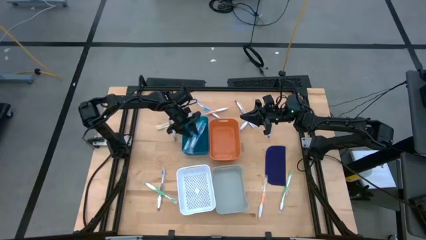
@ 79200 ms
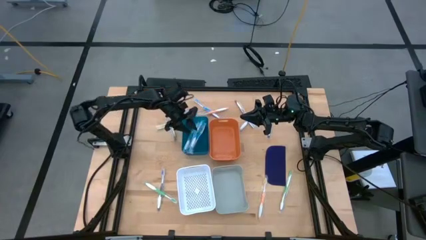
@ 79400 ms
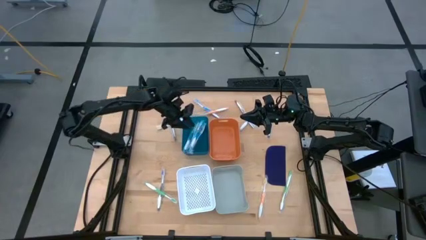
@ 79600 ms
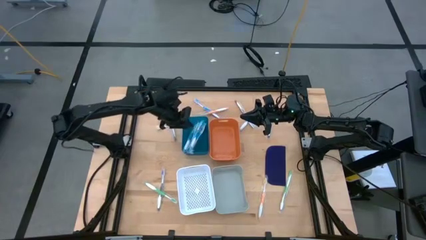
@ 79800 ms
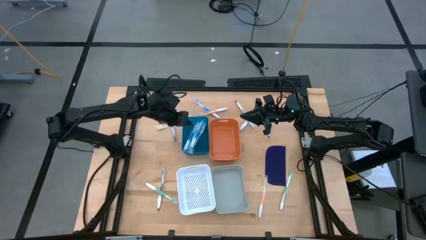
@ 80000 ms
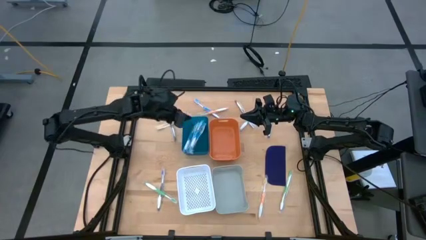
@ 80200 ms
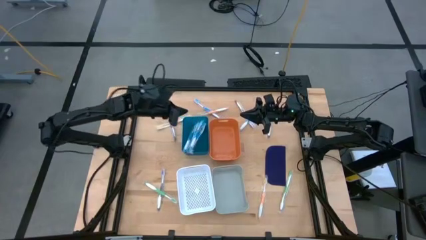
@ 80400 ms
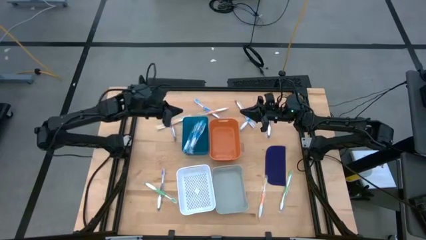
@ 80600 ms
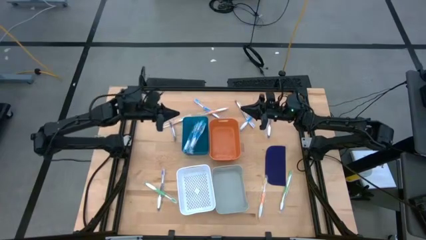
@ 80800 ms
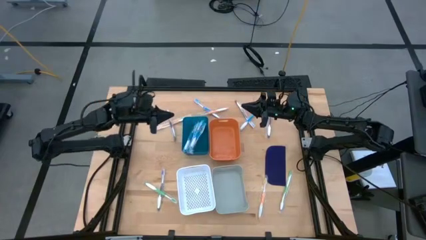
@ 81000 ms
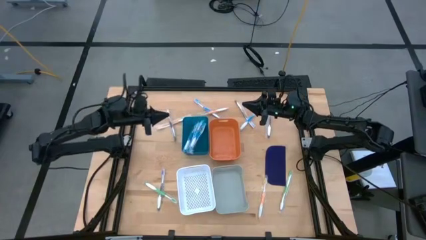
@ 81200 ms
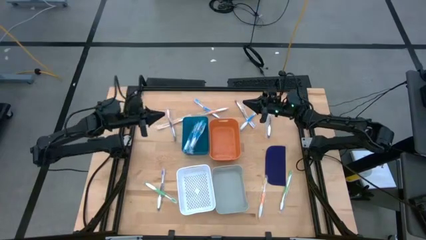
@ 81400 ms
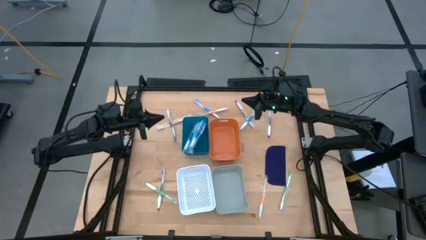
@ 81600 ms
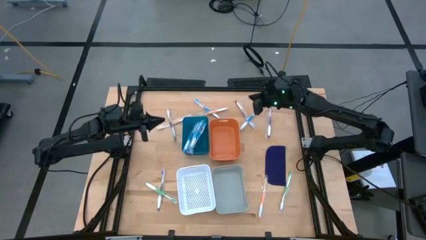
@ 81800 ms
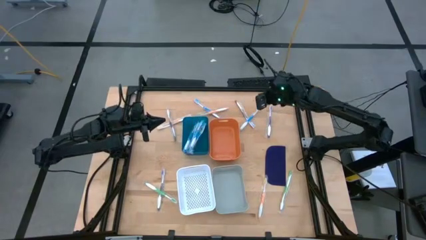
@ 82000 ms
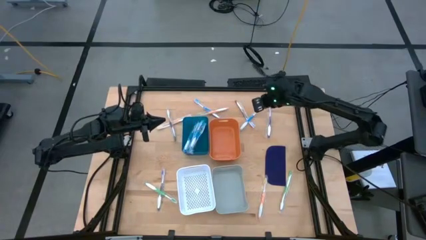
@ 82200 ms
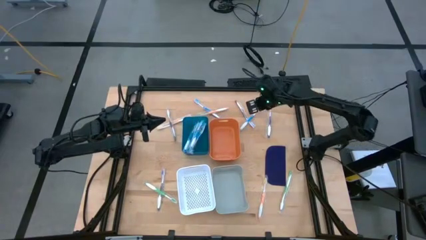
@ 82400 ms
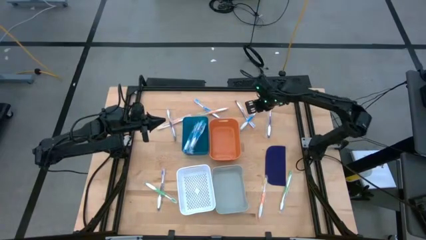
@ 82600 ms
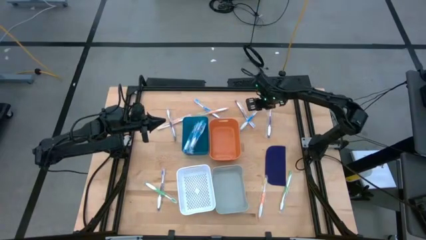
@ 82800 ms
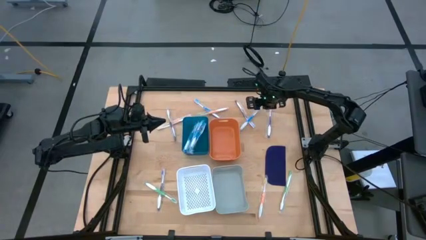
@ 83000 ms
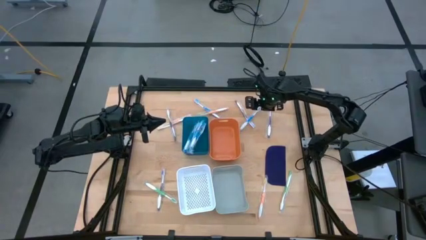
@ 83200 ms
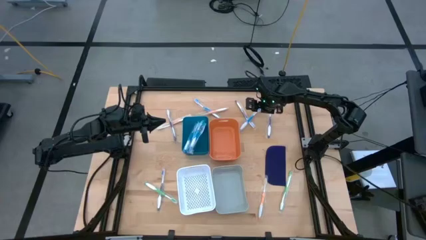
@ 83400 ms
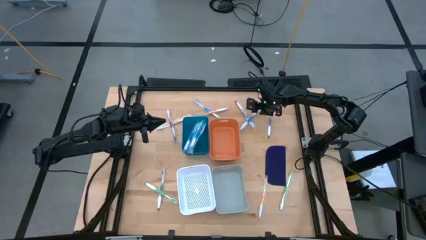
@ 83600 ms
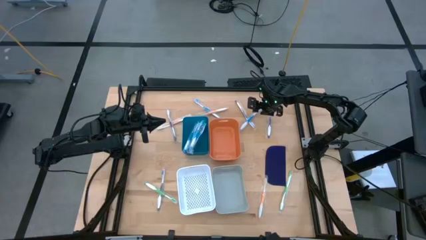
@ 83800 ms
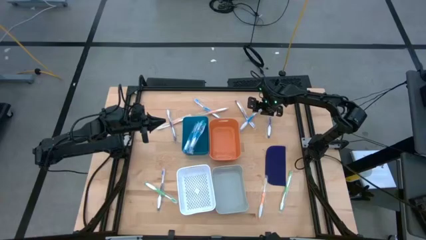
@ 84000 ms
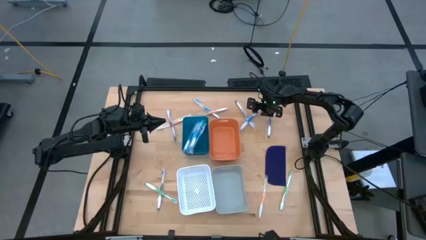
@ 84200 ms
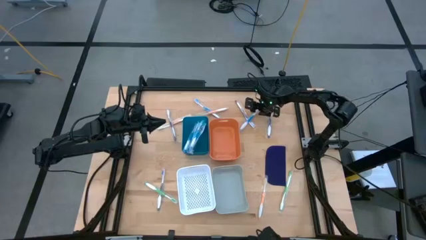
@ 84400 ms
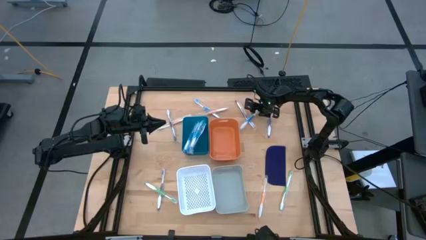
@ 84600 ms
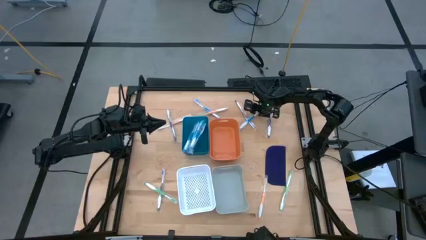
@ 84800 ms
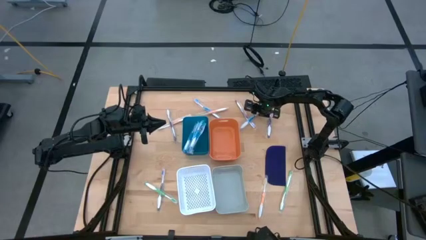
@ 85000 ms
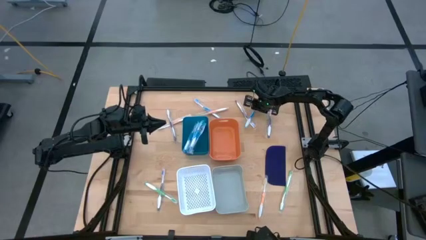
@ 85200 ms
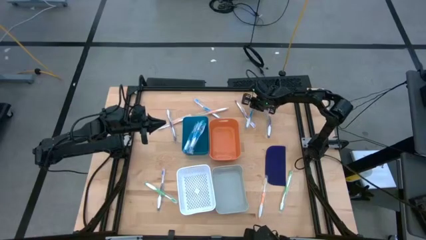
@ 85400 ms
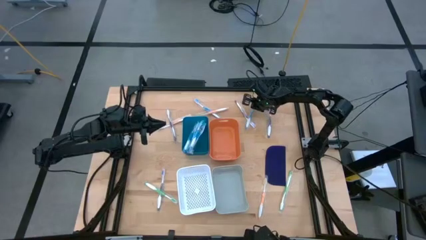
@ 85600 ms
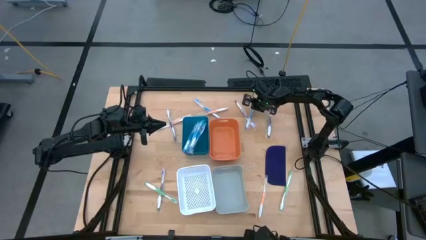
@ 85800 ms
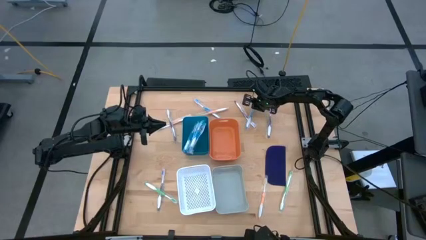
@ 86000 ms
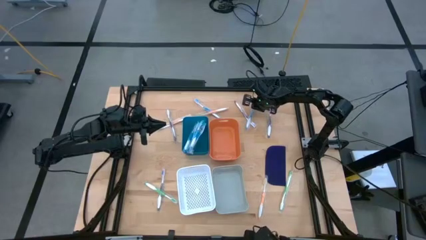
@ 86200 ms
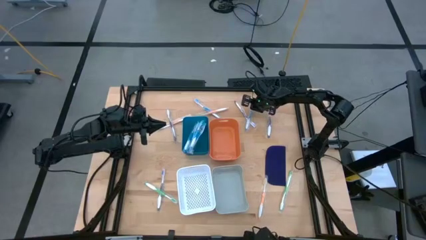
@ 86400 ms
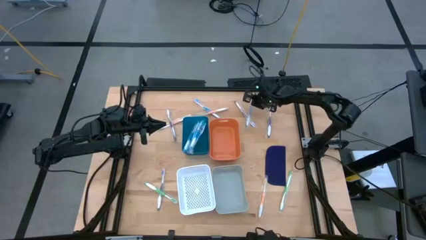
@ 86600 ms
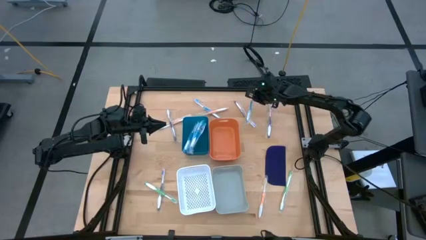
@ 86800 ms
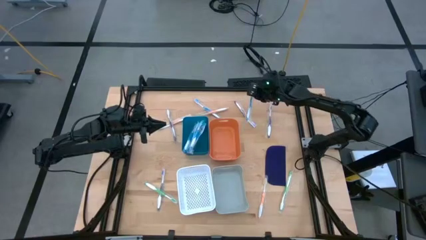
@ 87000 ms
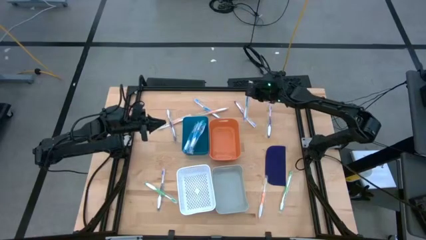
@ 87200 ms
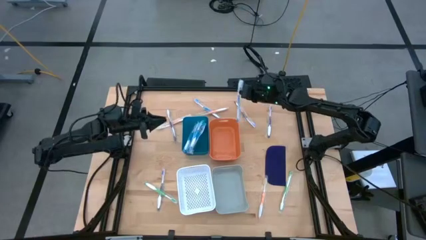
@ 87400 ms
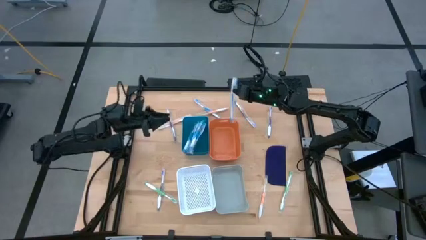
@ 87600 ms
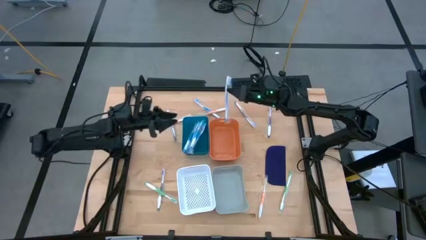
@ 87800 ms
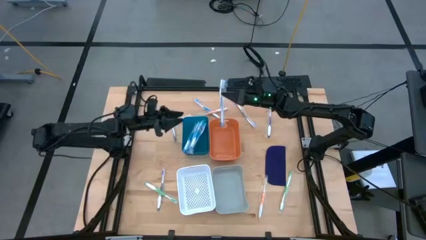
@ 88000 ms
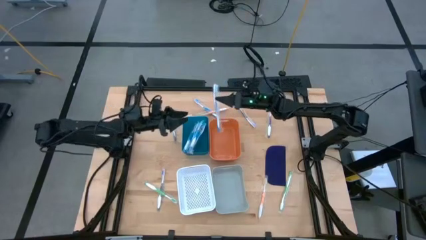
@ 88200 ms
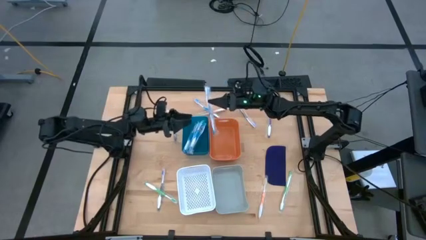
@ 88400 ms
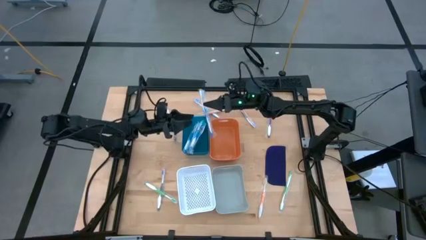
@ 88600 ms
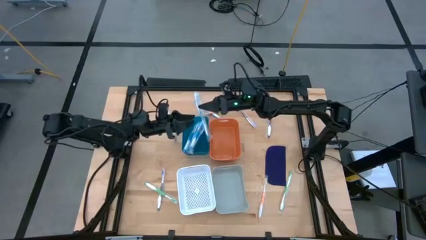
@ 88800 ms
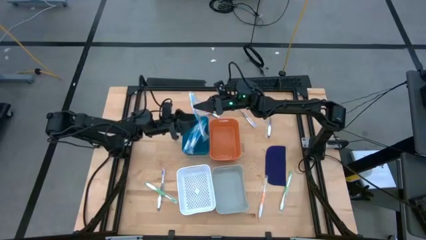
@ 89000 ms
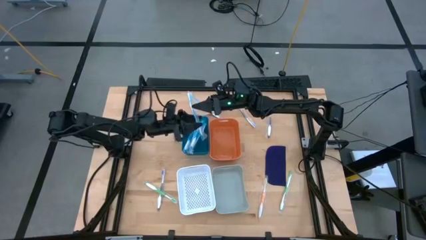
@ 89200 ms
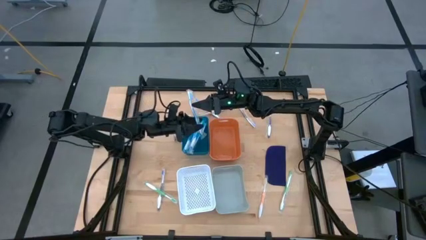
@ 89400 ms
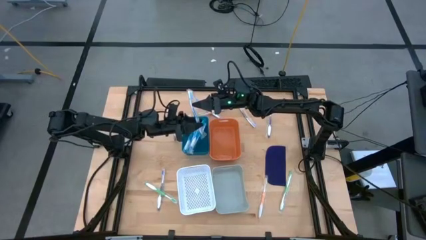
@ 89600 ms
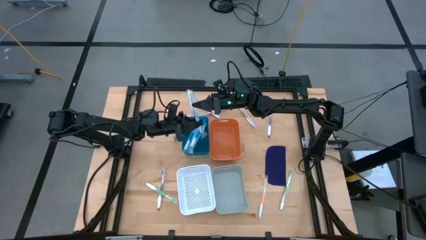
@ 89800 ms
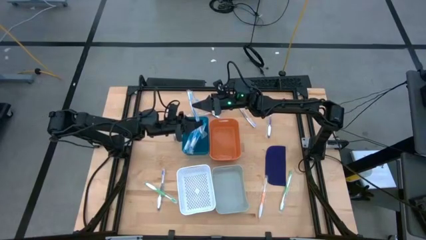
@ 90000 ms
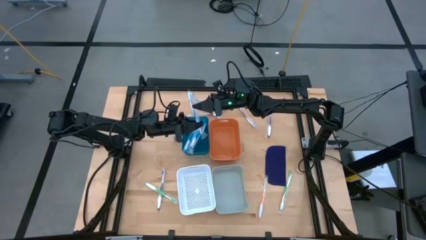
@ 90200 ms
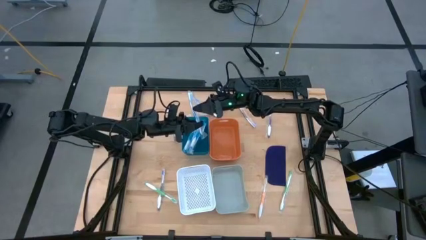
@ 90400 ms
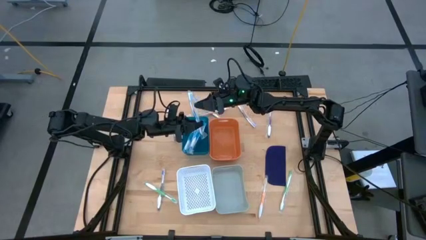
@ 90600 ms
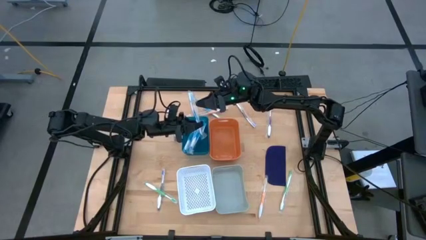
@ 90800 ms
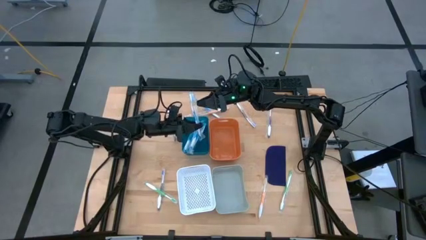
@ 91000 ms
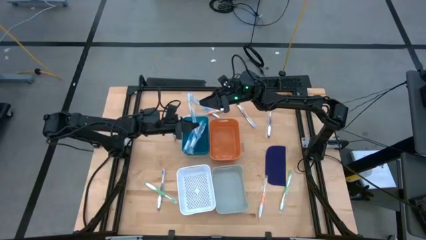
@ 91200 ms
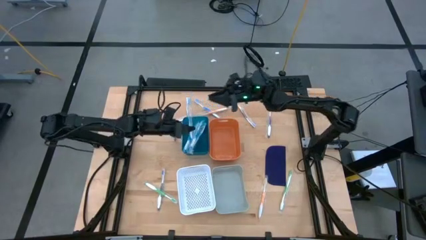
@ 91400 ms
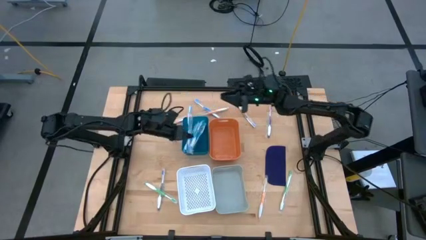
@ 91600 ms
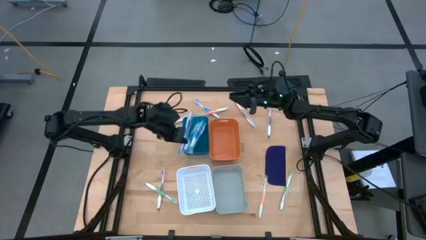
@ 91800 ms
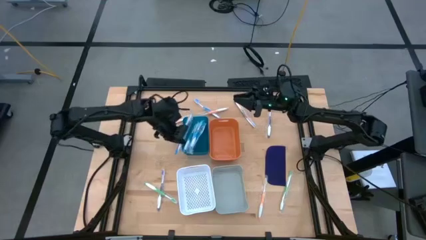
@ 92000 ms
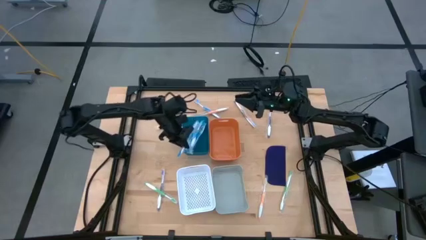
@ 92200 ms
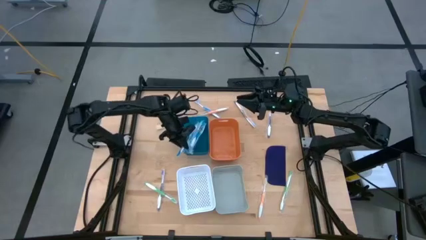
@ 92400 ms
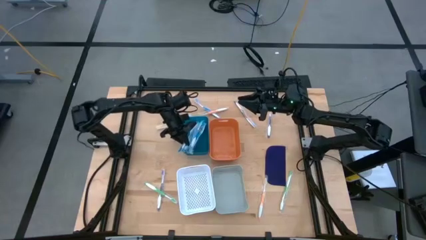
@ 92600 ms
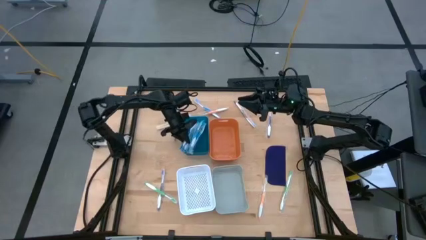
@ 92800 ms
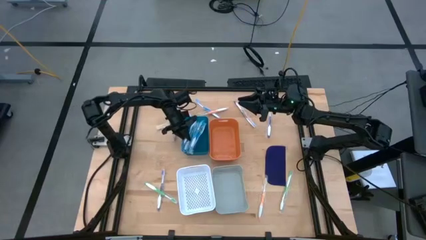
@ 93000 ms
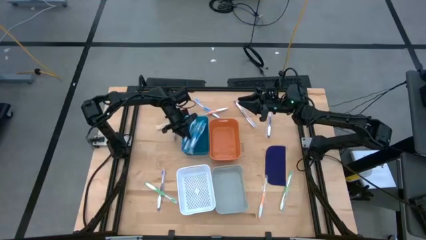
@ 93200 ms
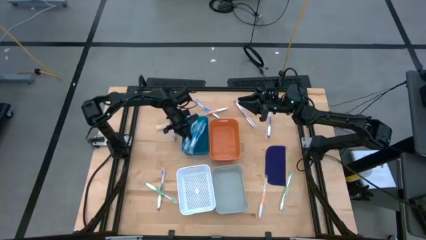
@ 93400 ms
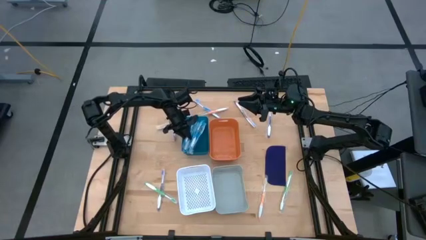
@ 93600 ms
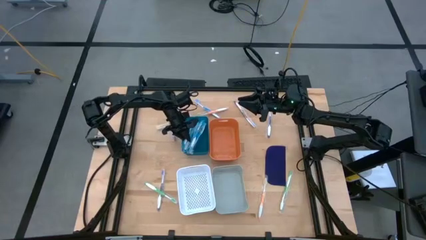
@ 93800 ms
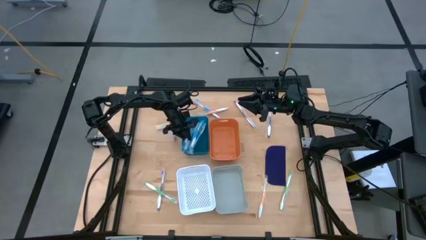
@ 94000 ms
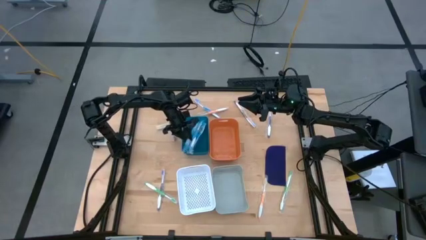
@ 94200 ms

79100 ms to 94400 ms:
Task: Pick & Place Toothbrushes
Put the blue toothbrush into the blue bin

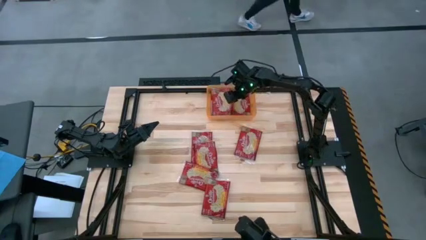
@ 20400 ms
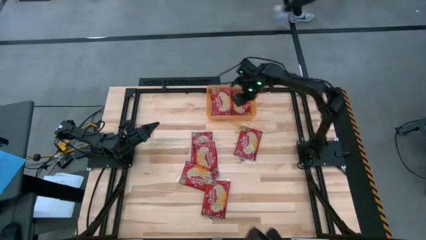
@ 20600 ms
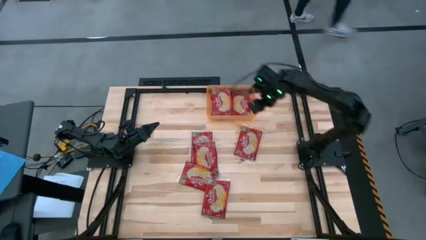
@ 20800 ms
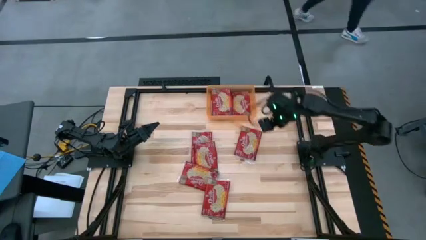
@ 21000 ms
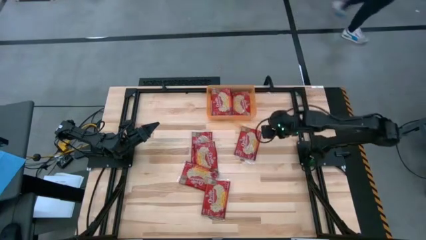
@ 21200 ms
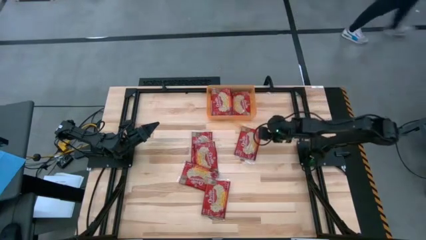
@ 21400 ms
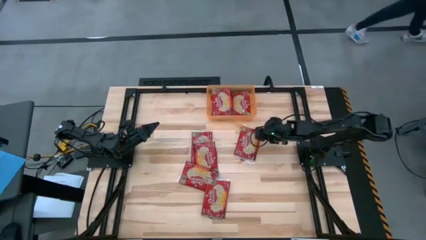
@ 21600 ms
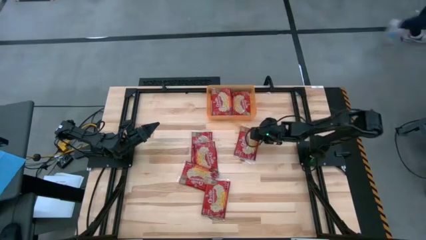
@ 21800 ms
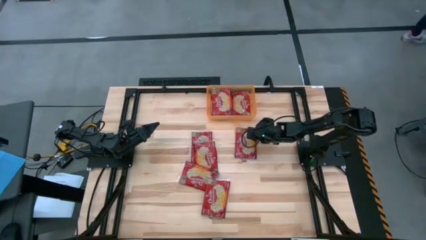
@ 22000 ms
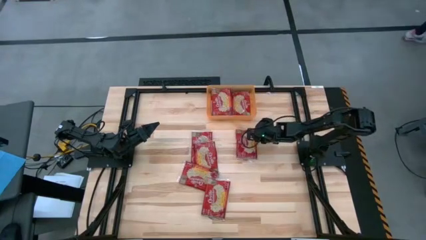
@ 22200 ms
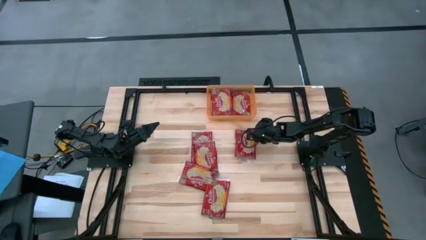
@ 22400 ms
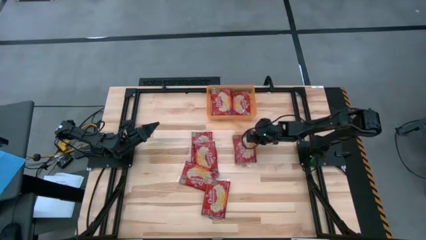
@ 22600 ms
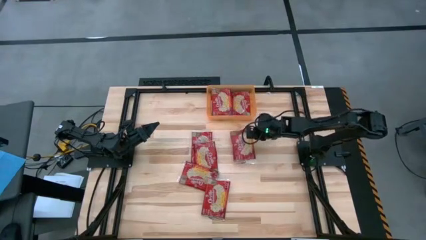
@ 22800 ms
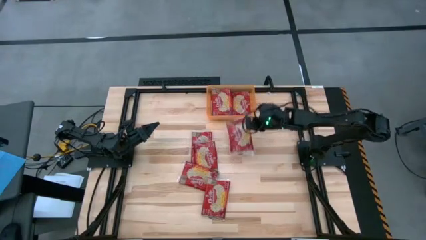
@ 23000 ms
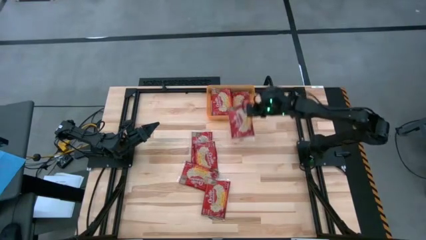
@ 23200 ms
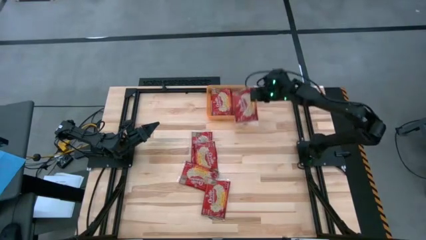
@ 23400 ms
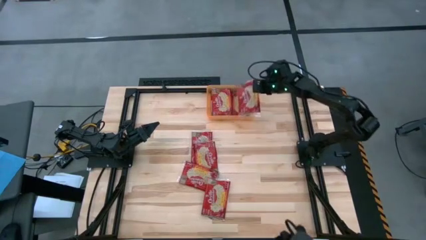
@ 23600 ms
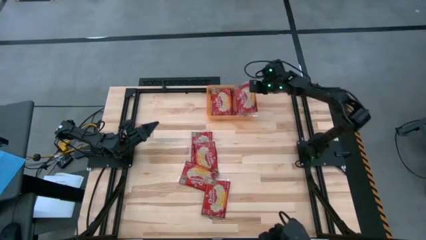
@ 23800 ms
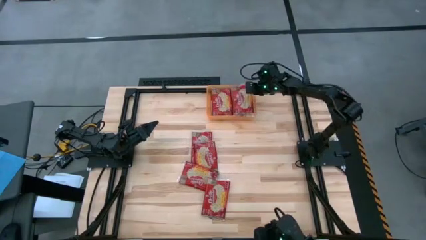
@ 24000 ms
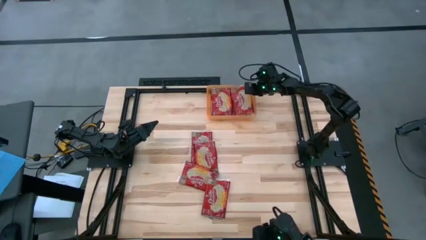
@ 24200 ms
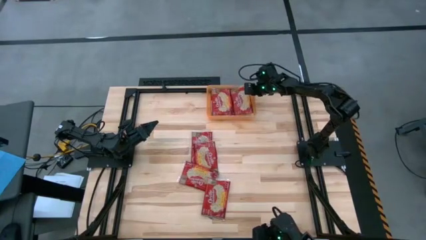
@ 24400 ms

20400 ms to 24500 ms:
Task: Sort popcorn bags into baskets
Put the red popcorn bag into the orange bin
